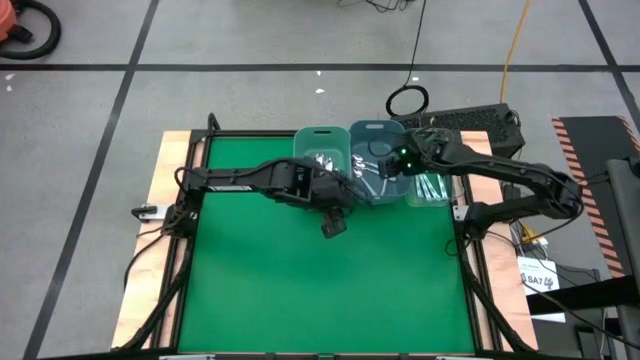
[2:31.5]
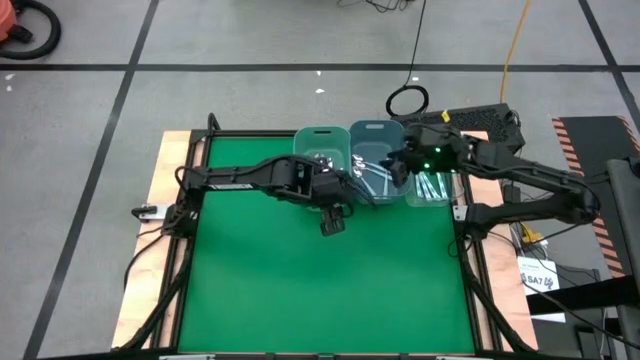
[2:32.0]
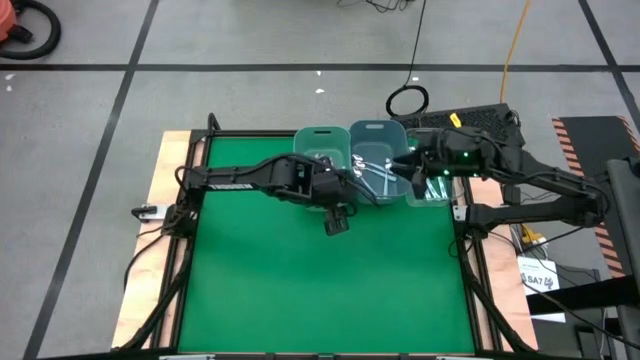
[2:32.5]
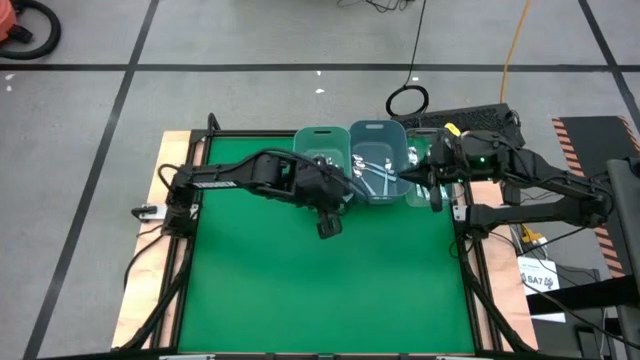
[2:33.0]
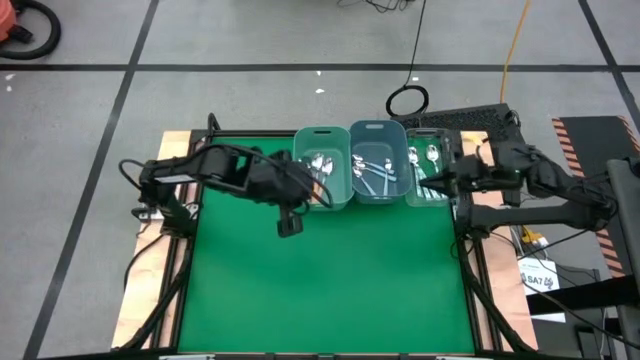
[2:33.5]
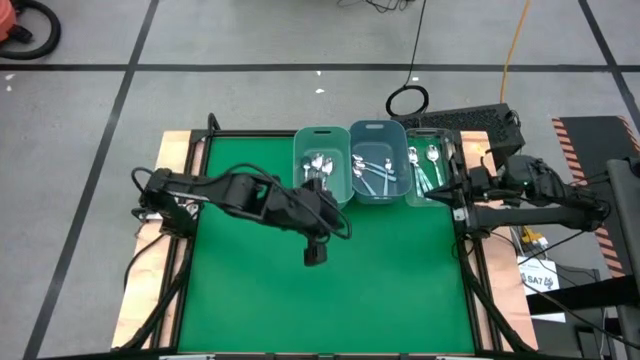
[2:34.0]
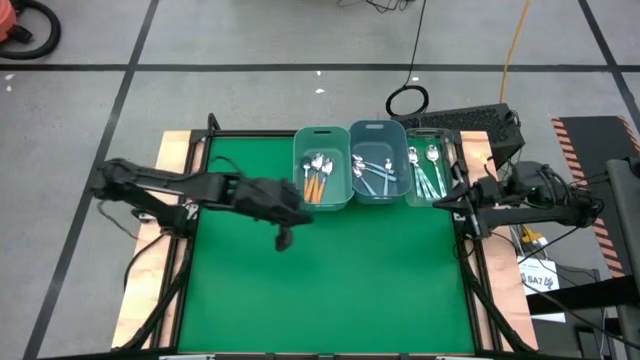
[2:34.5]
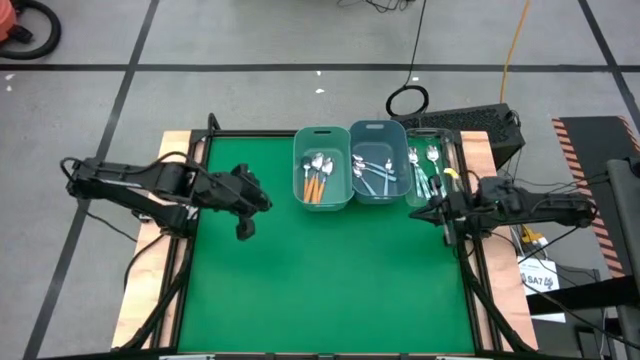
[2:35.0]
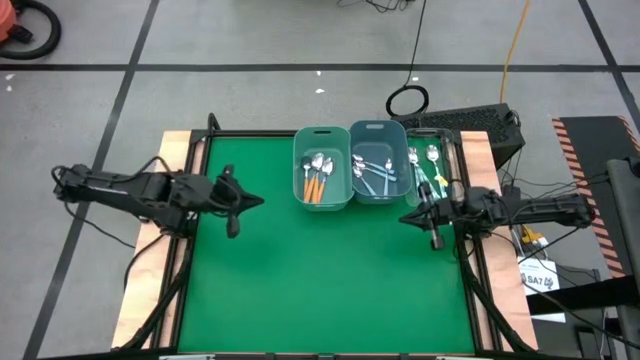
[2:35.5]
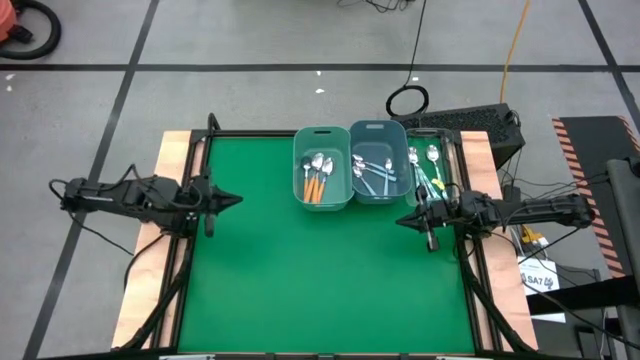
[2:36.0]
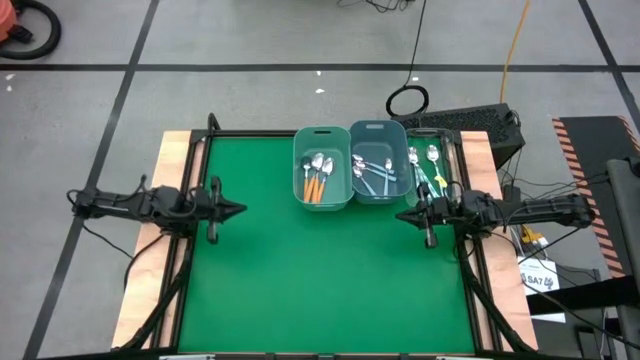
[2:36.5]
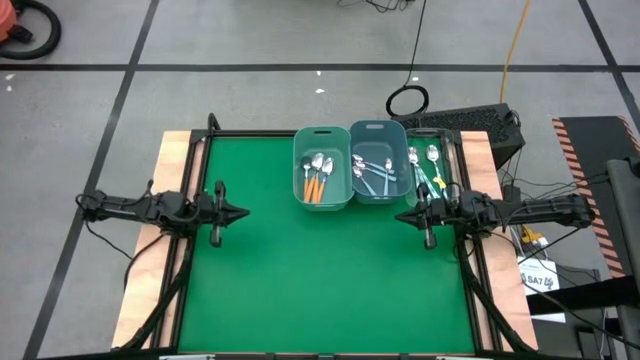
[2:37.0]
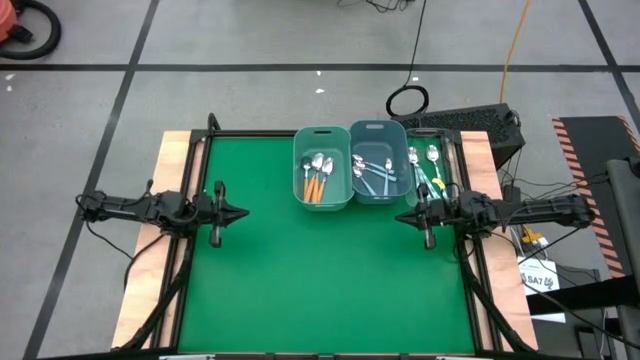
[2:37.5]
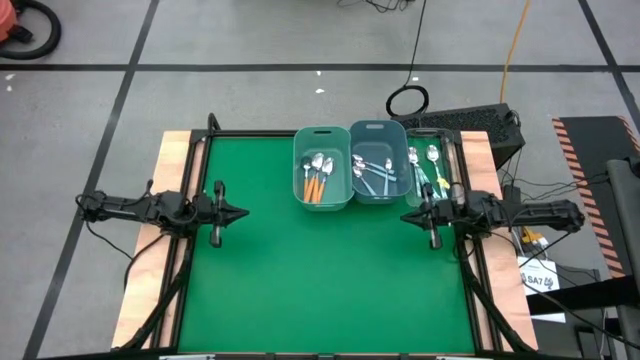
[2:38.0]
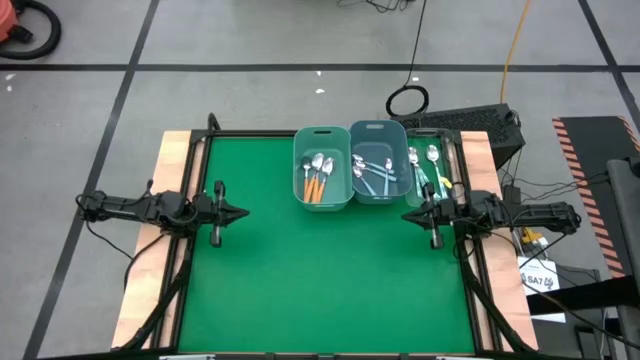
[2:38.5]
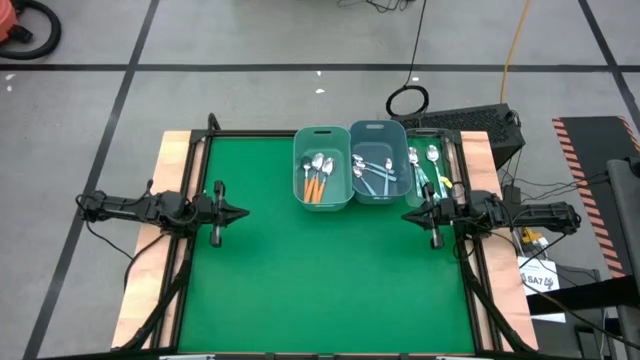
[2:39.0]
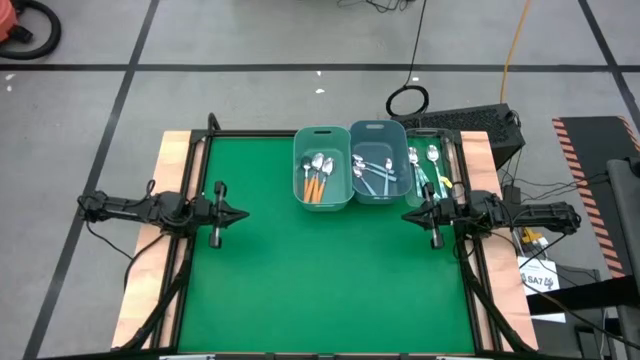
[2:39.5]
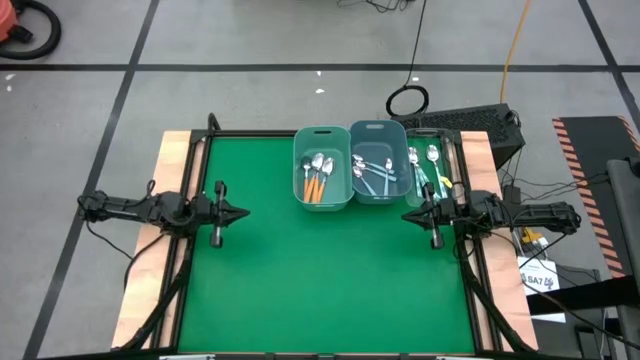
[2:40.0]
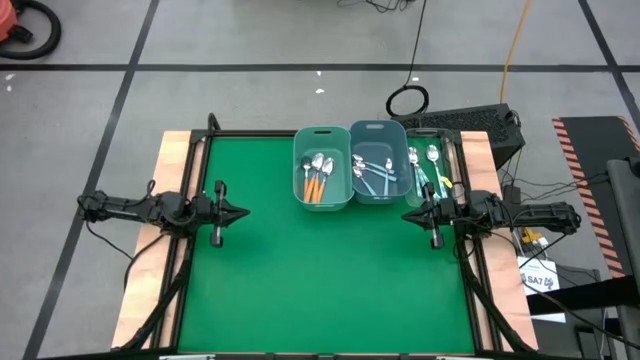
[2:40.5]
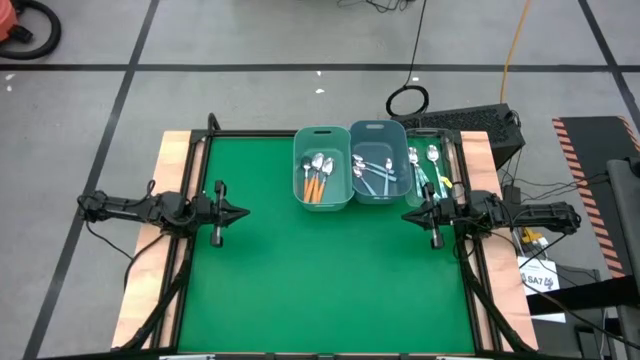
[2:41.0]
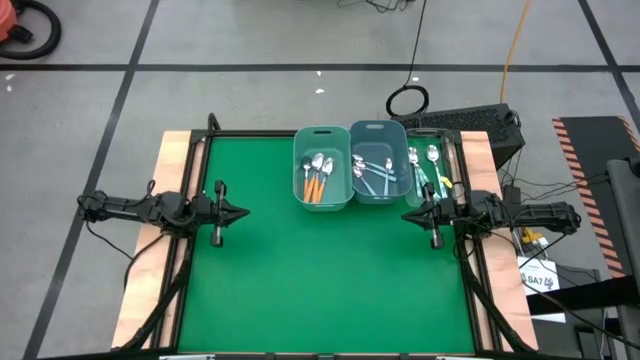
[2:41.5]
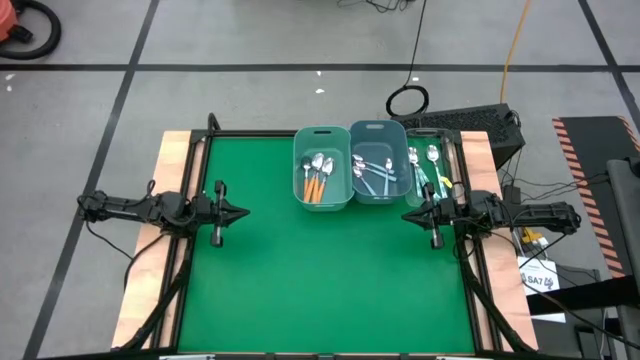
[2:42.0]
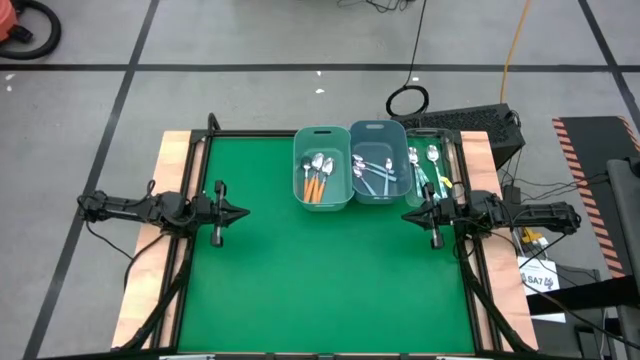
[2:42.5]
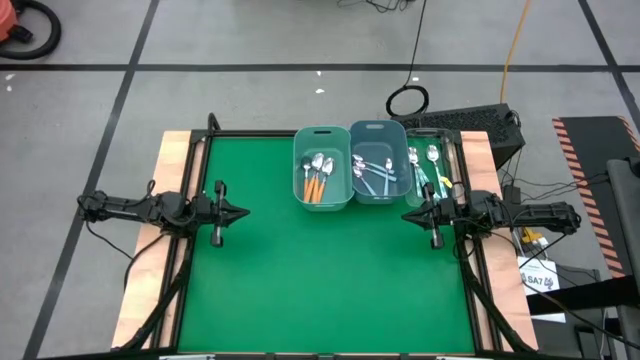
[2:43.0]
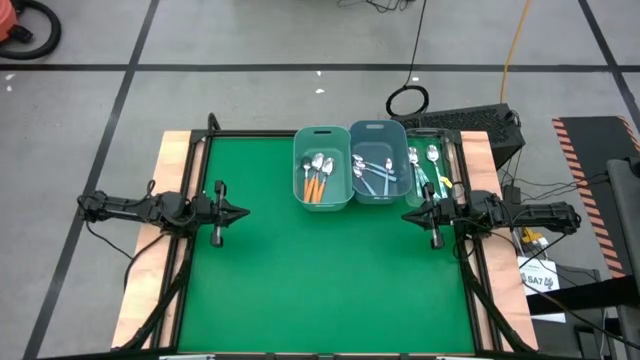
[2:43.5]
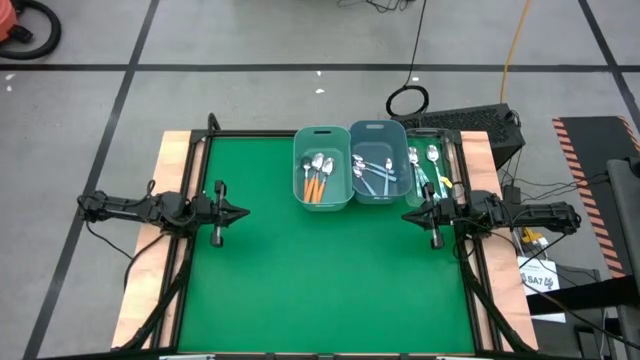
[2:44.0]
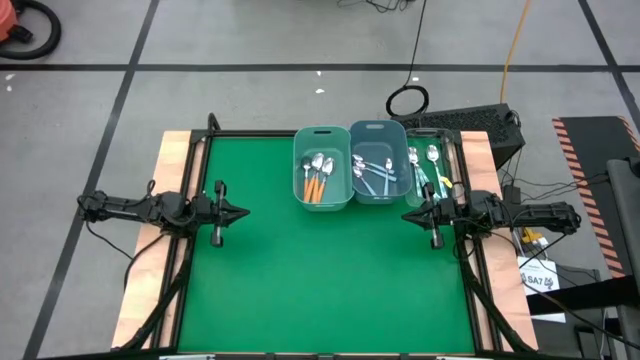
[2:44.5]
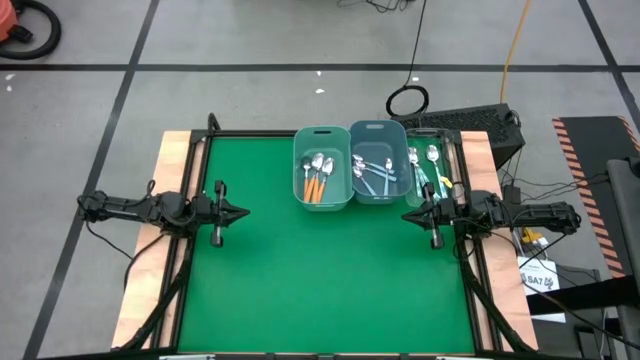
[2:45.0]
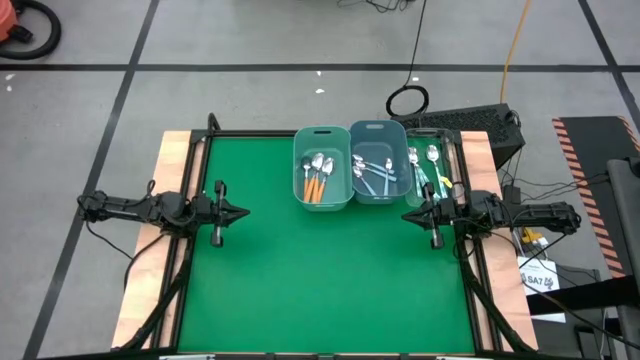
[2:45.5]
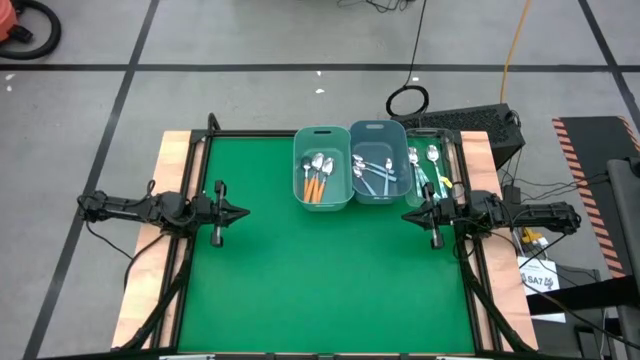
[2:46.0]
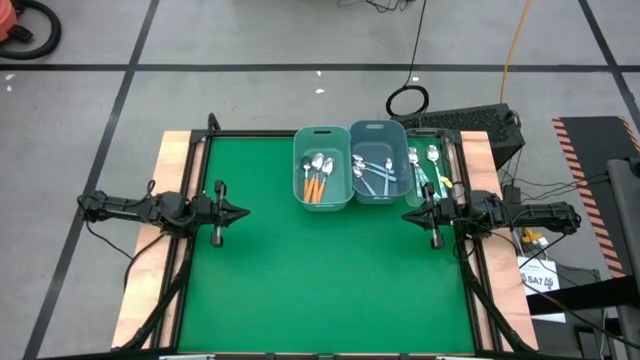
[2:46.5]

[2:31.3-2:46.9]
Task: Sort silverware by color (type)
Return to Home Position
